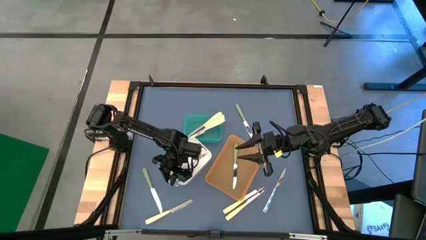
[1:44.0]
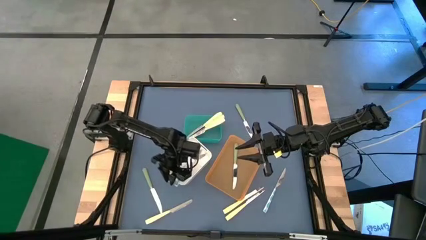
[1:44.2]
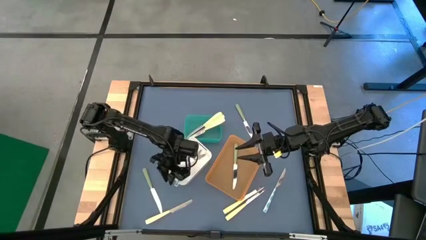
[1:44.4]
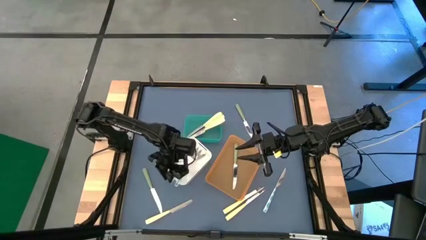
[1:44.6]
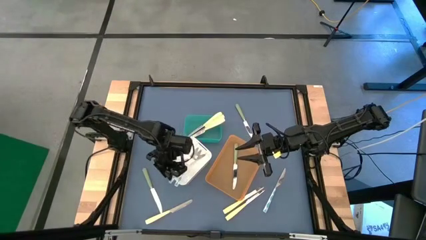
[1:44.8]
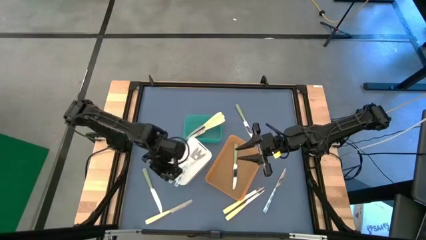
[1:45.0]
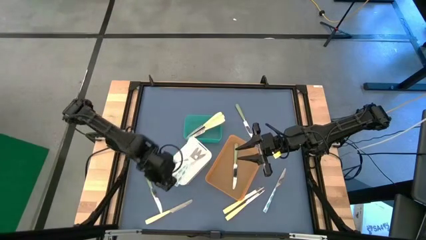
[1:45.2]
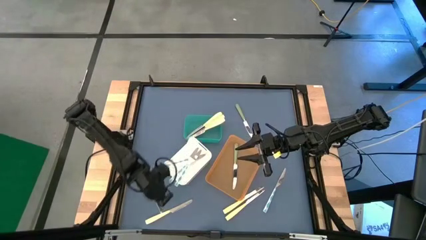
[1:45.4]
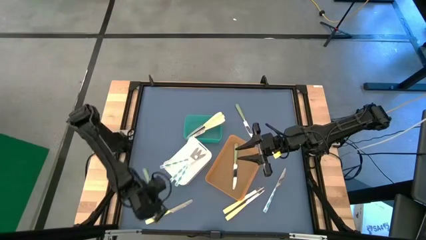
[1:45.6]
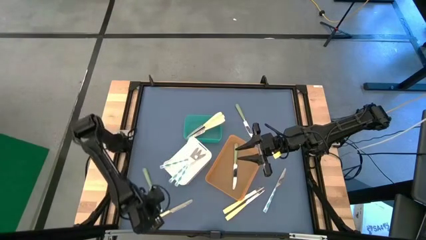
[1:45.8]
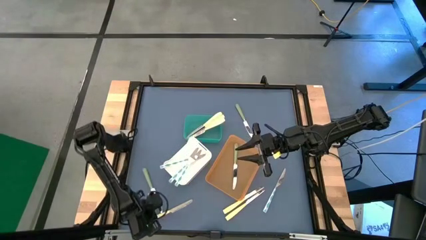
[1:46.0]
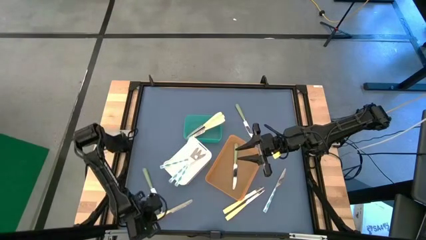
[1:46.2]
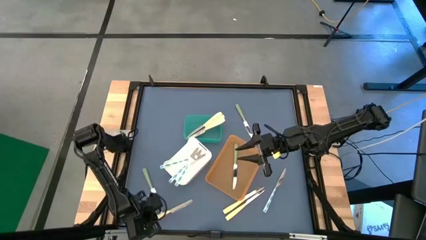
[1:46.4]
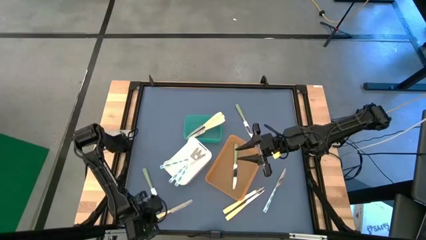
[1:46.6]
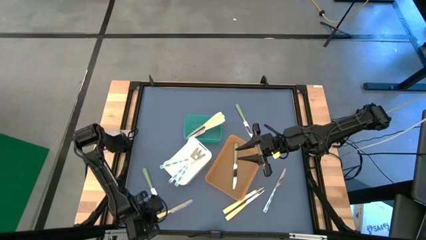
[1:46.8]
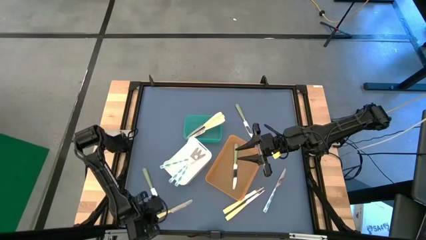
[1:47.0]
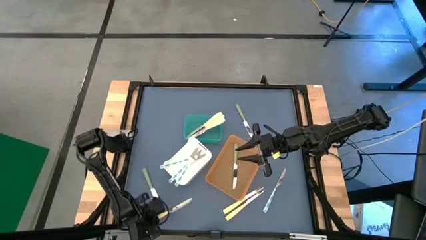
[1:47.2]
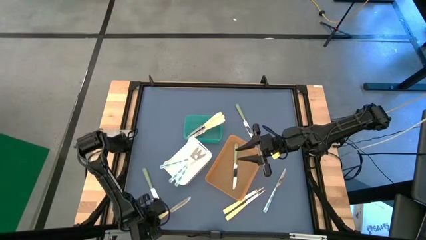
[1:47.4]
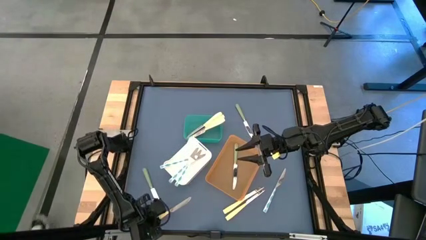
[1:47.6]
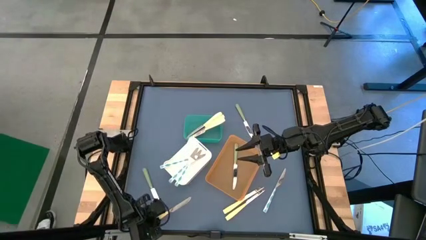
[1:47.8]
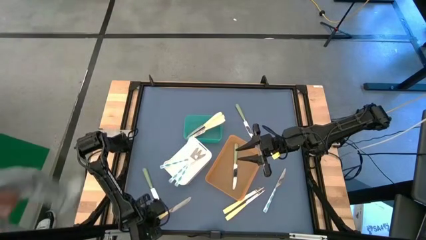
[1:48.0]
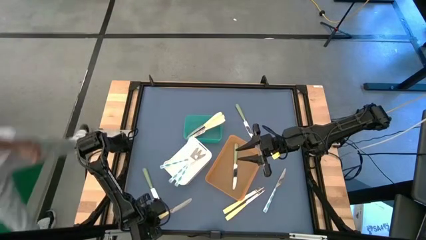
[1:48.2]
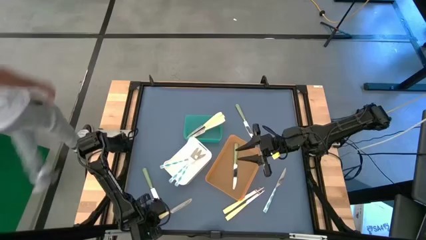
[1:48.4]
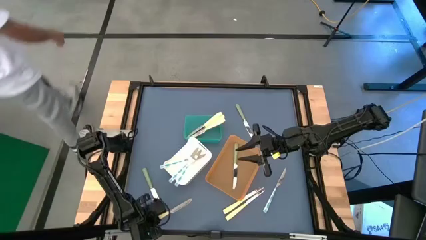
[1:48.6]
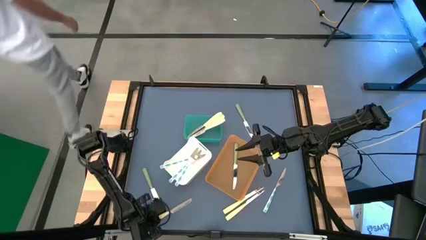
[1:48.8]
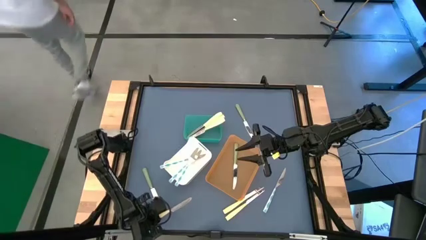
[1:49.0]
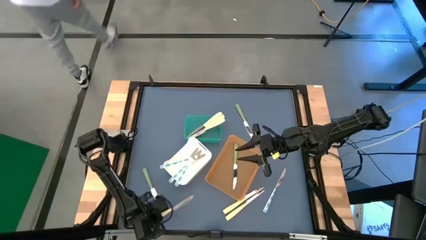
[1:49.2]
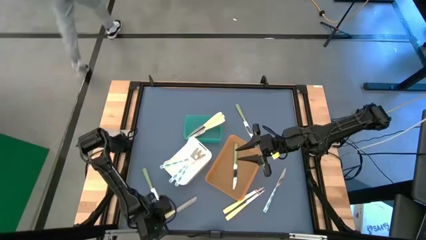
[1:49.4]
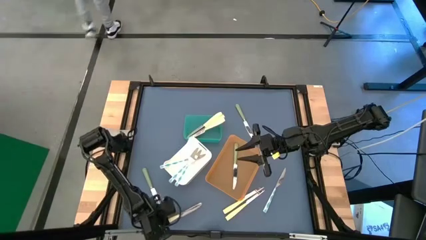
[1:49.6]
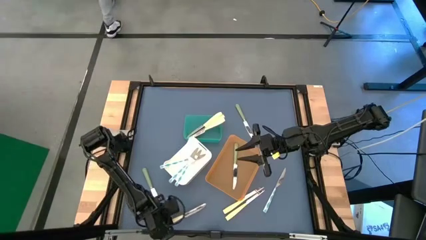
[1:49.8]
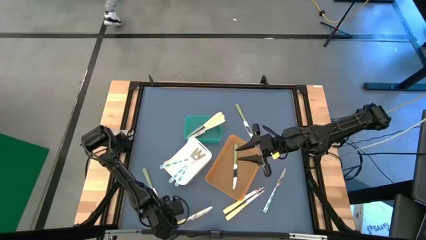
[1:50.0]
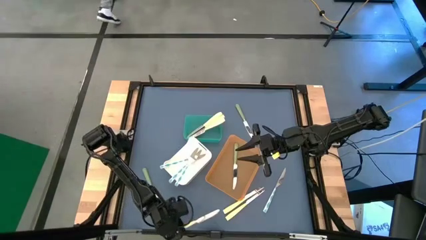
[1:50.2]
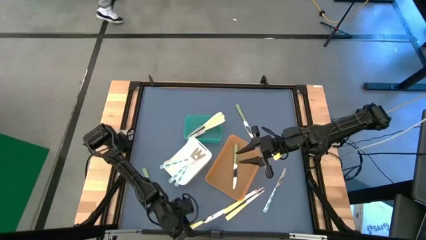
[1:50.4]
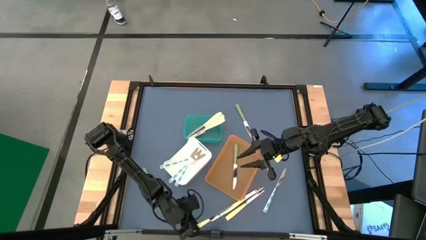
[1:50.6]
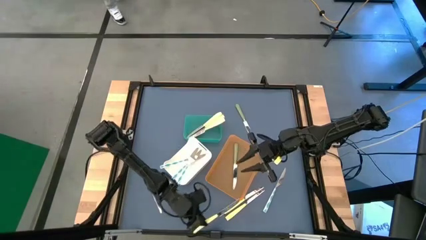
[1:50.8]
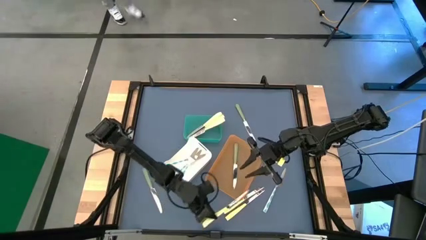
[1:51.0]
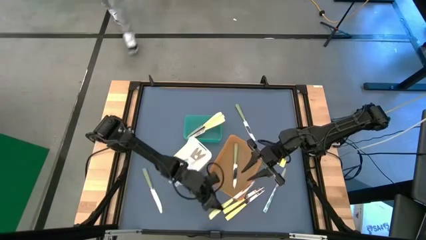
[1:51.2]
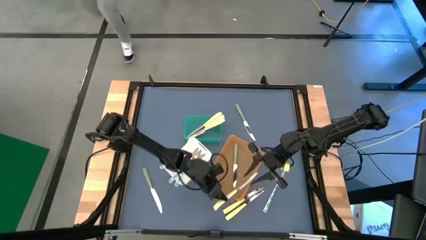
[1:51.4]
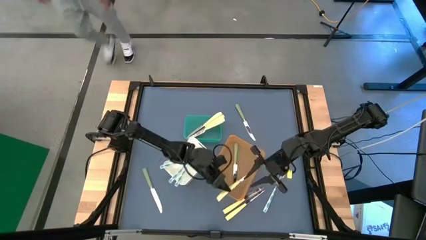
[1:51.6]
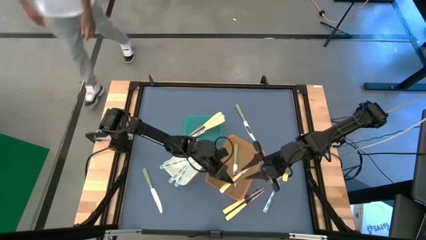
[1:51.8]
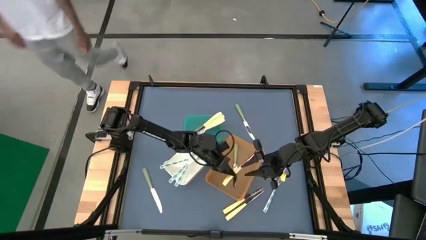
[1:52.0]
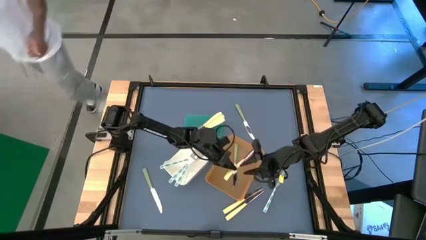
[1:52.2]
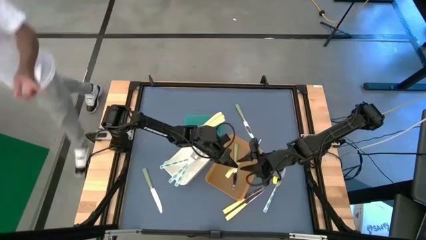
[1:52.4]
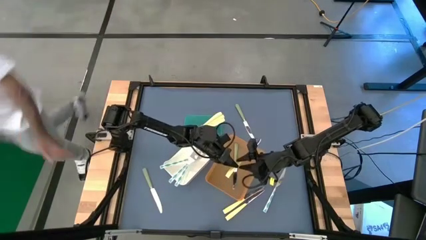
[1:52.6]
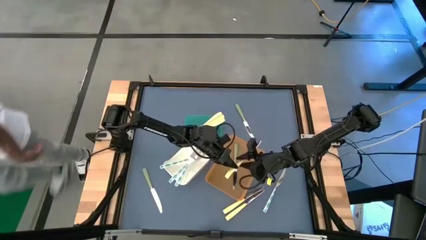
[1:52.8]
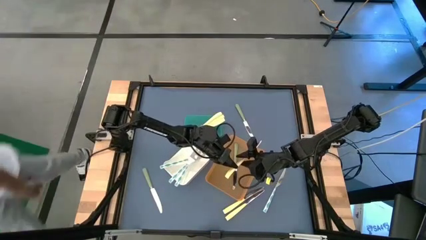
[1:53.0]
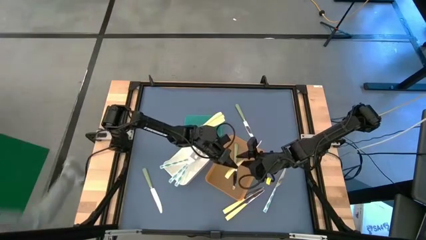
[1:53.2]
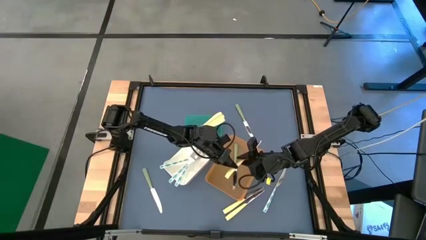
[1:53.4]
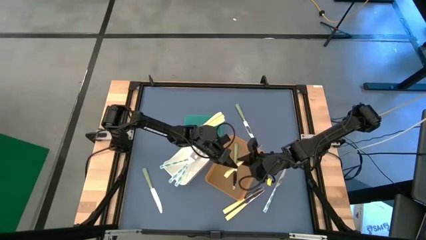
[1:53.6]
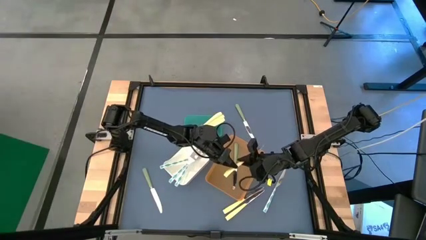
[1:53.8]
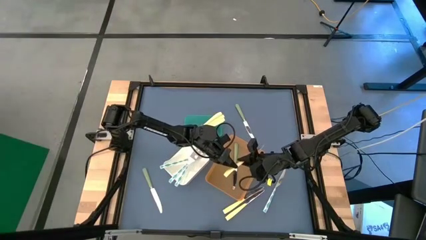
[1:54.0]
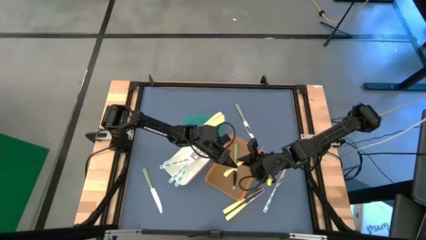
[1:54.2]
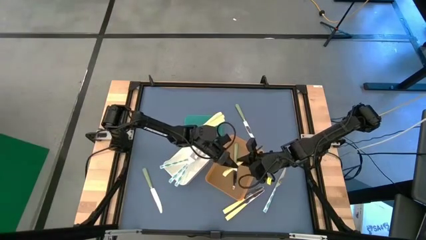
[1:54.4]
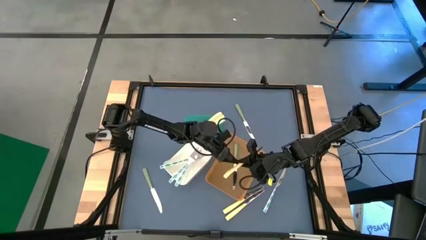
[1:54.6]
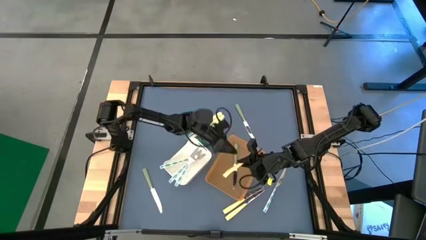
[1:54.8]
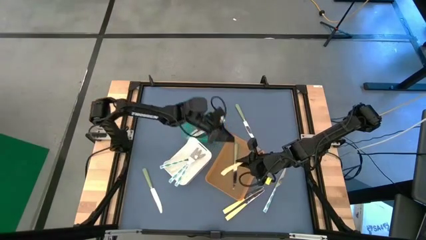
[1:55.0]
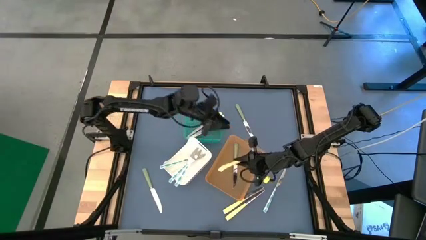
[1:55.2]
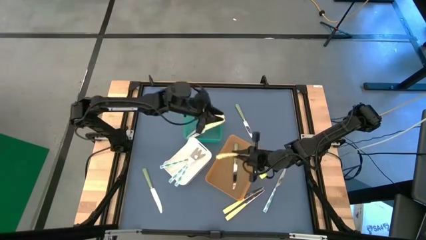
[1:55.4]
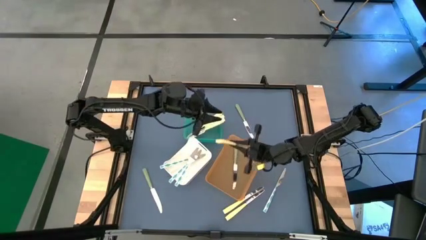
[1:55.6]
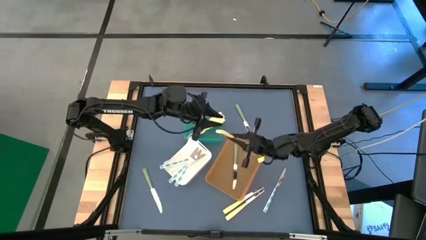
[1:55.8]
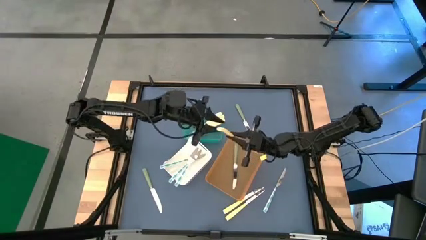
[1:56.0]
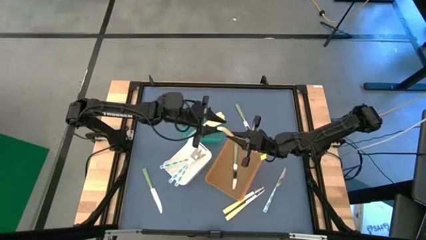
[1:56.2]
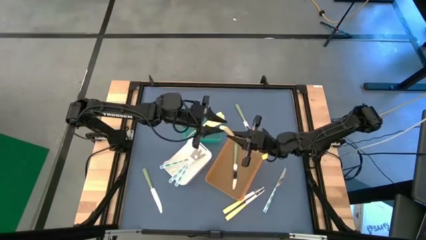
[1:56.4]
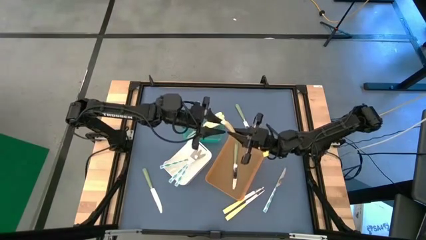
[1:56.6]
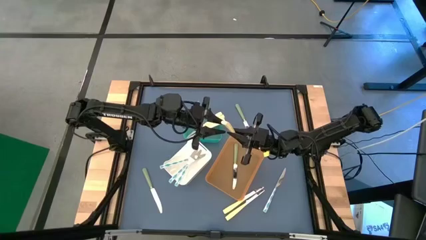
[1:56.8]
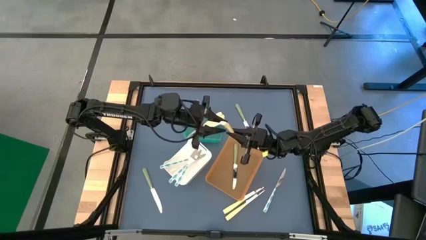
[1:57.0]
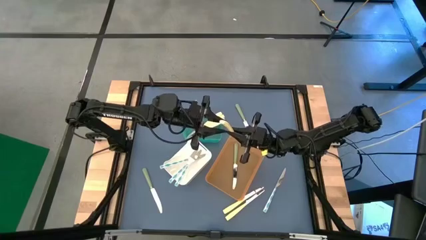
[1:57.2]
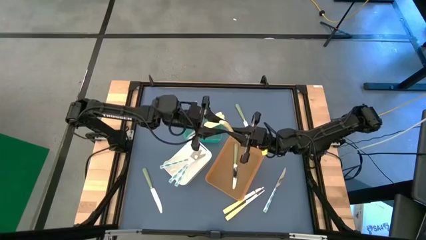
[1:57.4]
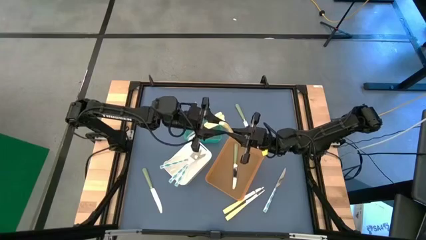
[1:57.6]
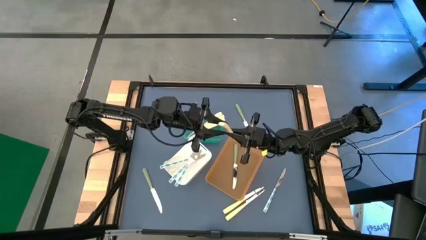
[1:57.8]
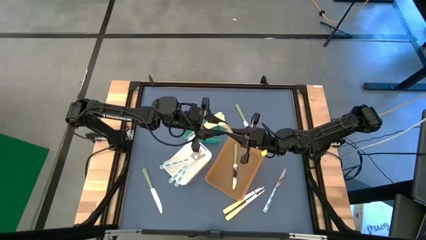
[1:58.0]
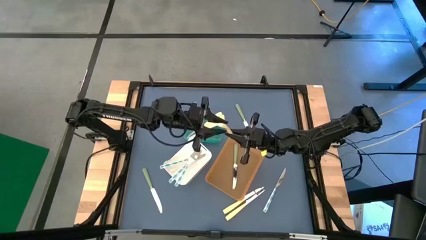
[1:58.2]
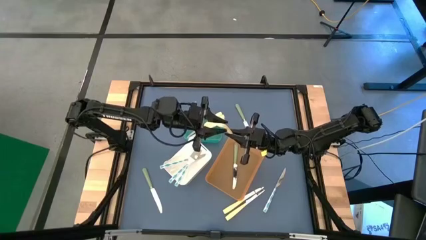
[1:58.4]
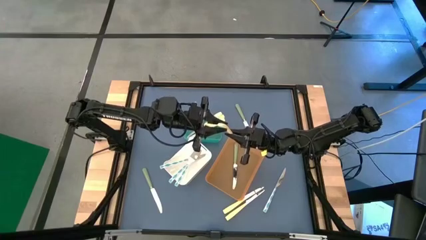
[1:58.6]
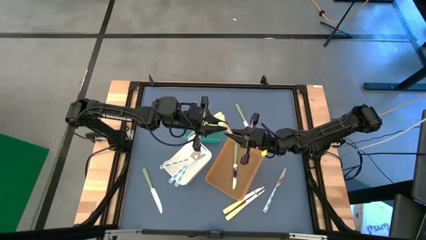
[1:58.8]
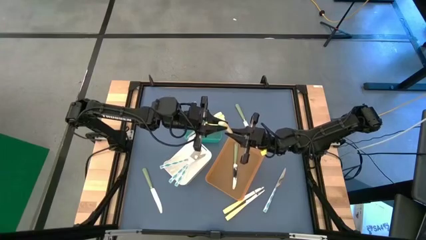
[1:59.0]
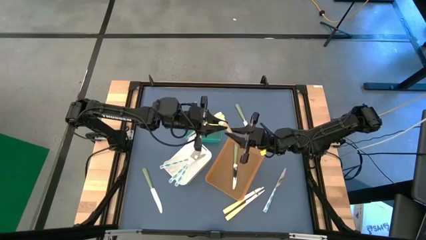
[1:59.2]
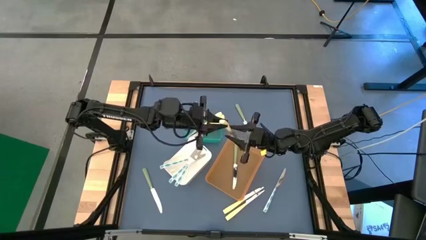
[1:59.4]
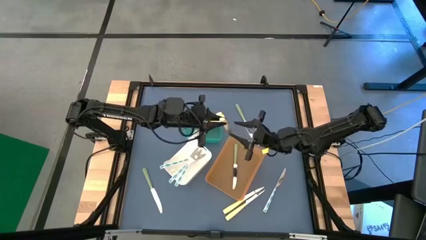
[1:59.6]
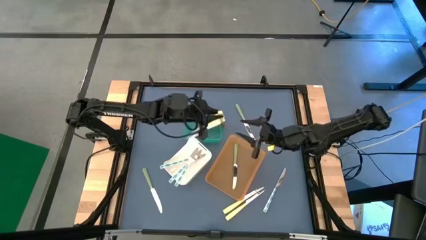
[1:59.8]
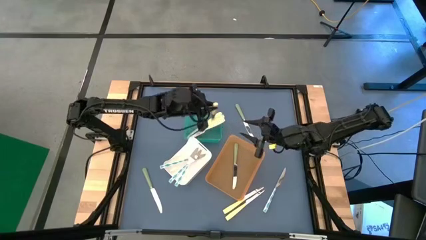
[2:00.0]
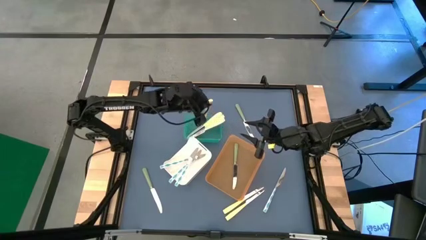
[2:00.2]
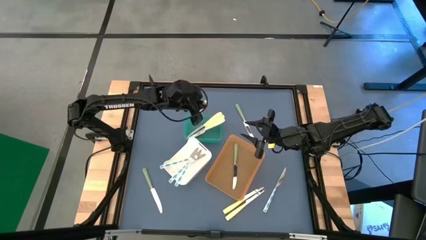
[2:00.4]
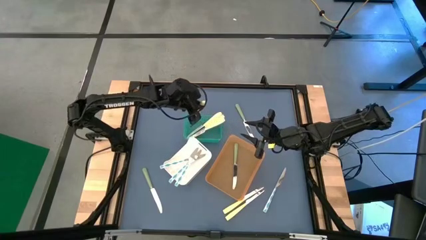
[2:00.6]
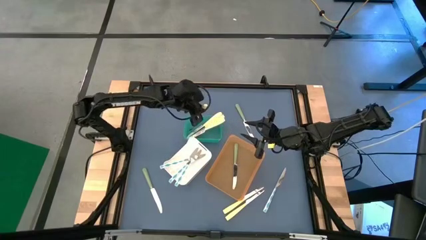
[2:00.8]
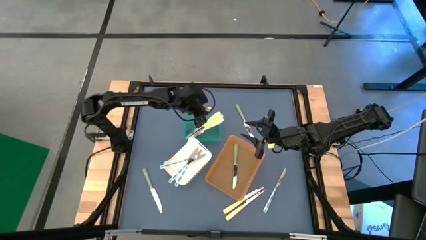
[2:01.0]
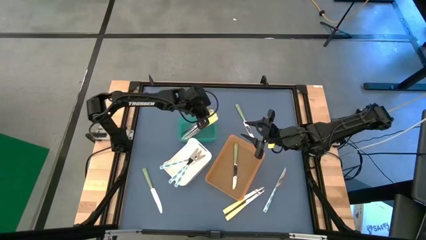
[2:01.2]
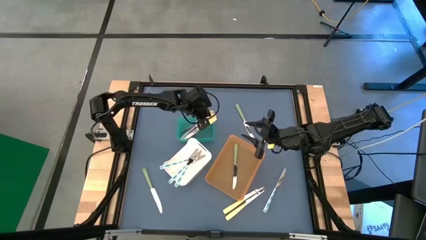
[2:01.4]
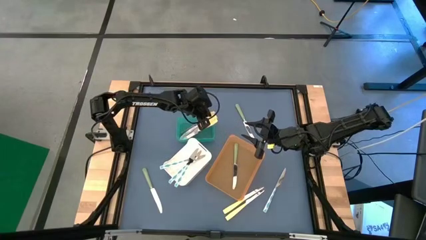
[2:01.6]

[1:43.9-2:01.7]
Task: Sort silverware by color (type)
Put the yellow knife into the blue bin
